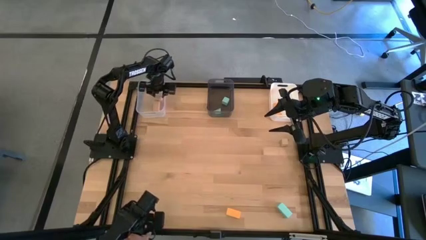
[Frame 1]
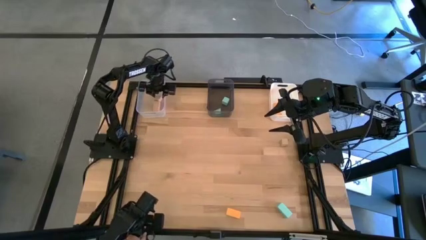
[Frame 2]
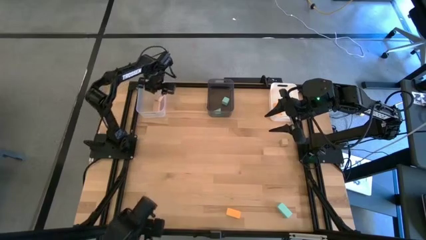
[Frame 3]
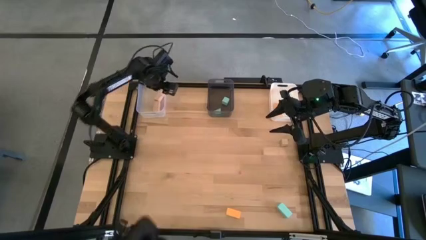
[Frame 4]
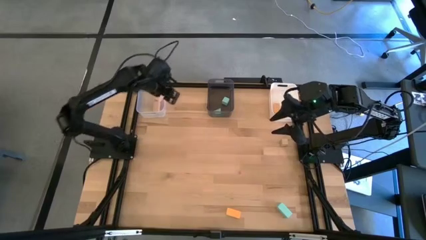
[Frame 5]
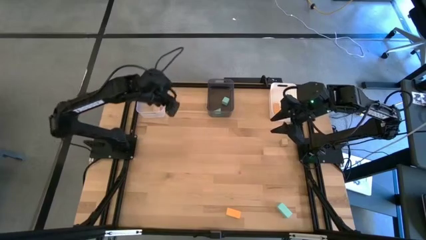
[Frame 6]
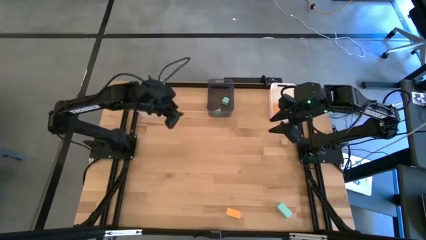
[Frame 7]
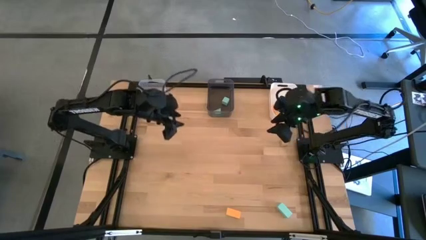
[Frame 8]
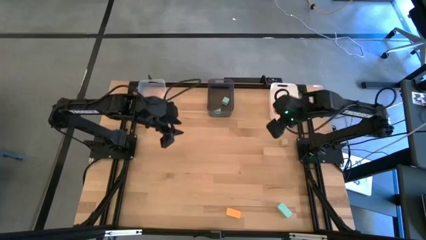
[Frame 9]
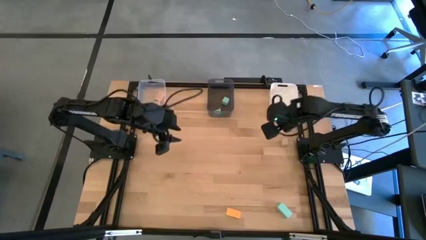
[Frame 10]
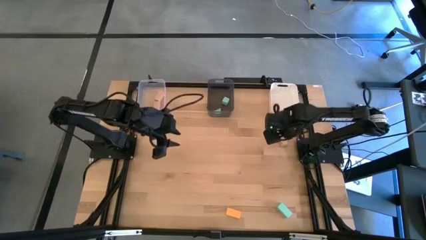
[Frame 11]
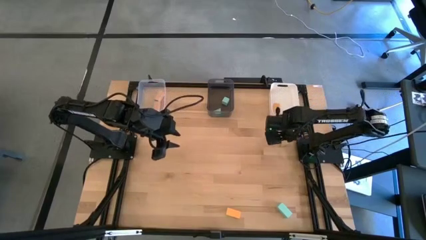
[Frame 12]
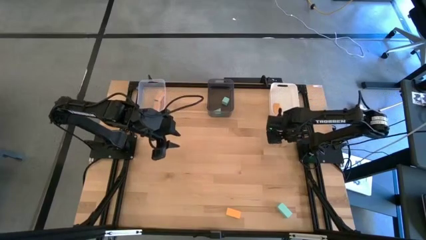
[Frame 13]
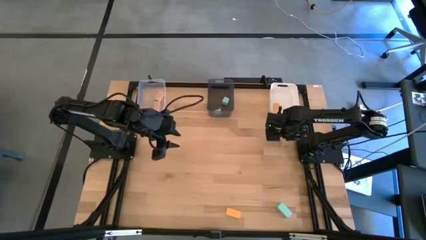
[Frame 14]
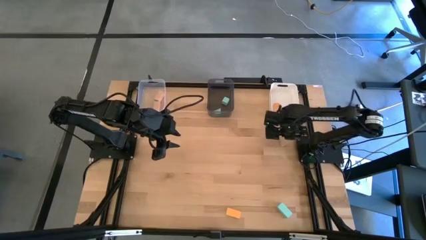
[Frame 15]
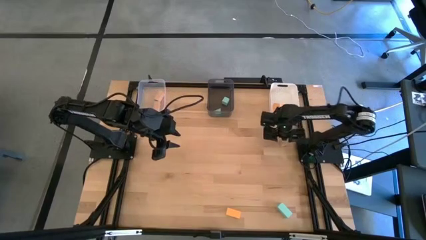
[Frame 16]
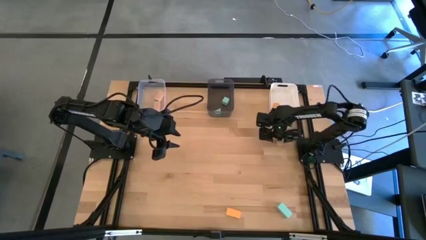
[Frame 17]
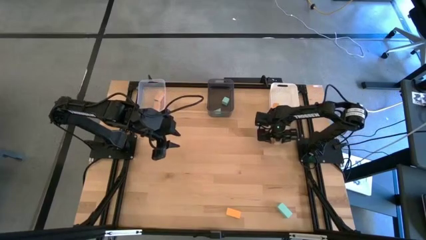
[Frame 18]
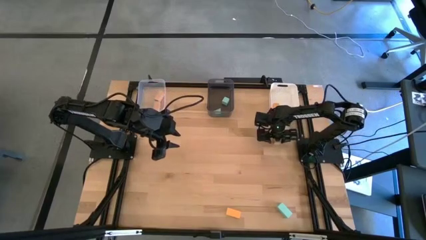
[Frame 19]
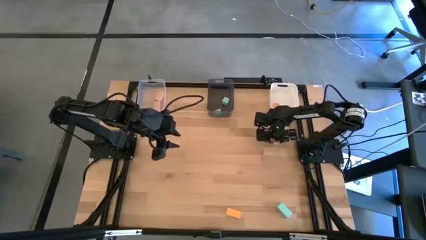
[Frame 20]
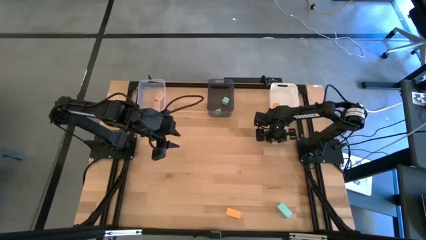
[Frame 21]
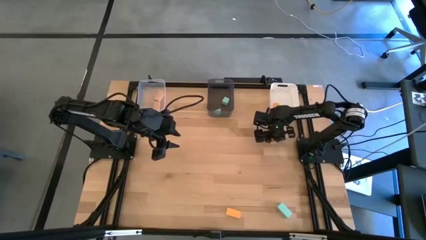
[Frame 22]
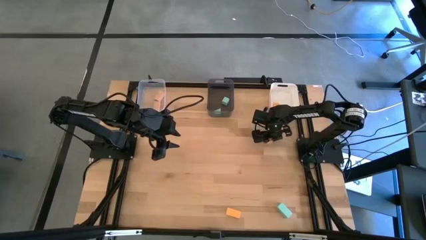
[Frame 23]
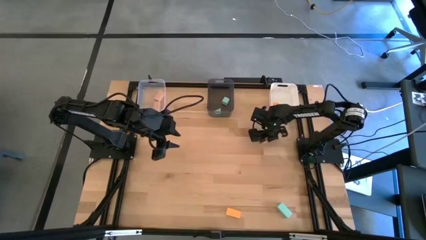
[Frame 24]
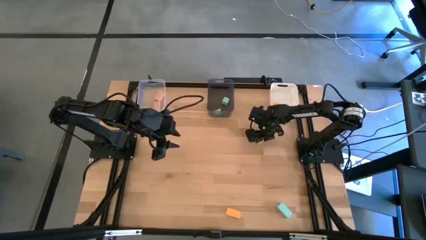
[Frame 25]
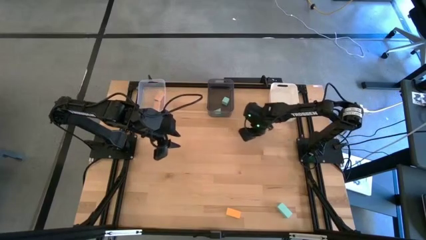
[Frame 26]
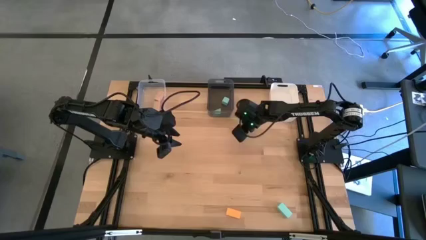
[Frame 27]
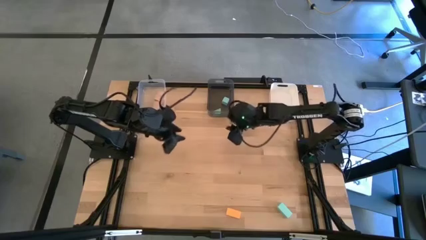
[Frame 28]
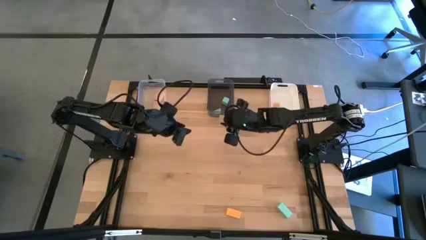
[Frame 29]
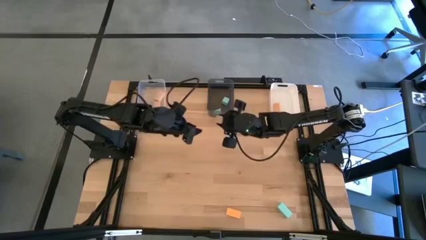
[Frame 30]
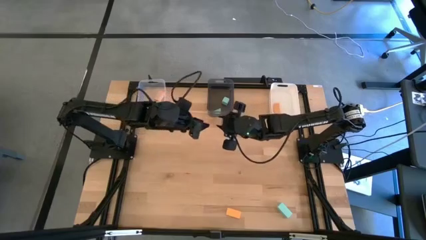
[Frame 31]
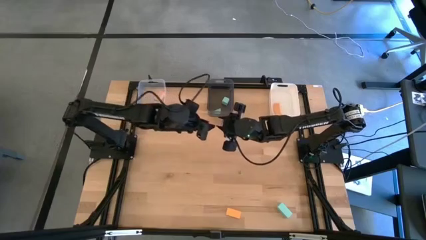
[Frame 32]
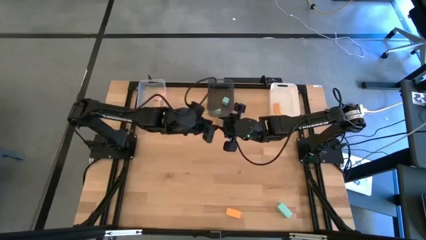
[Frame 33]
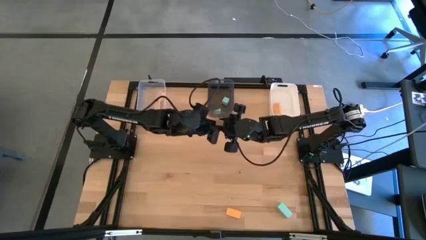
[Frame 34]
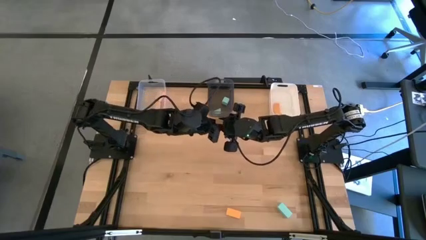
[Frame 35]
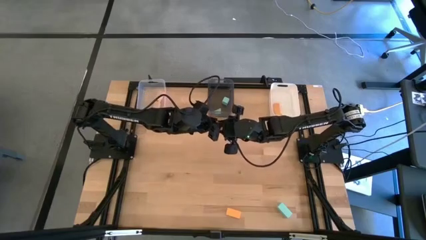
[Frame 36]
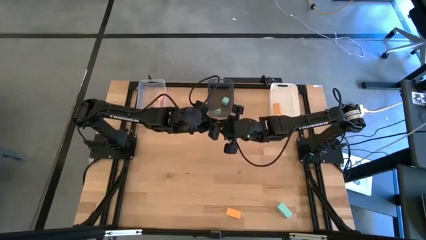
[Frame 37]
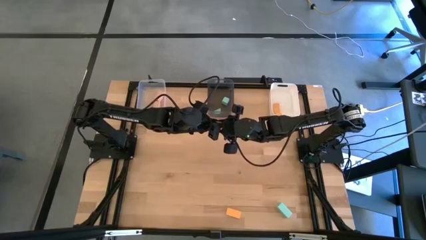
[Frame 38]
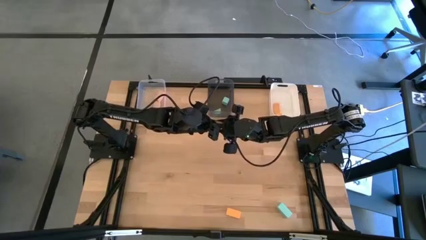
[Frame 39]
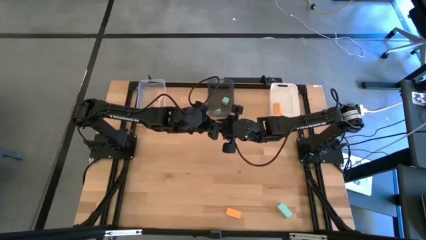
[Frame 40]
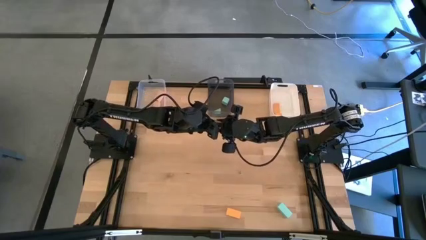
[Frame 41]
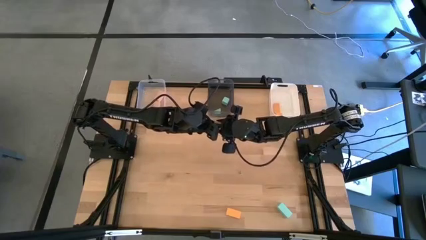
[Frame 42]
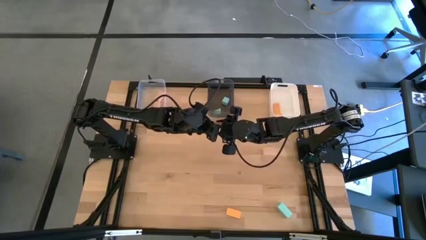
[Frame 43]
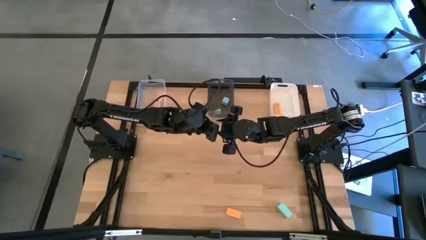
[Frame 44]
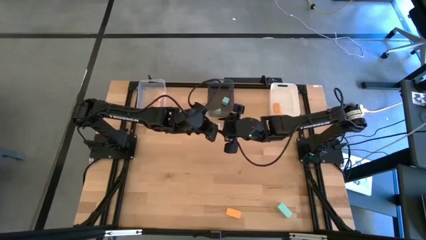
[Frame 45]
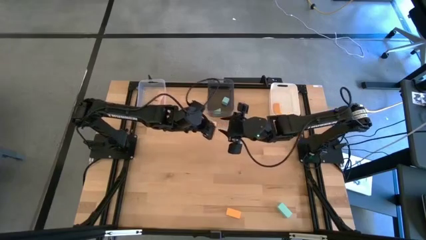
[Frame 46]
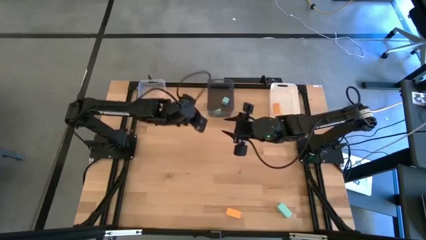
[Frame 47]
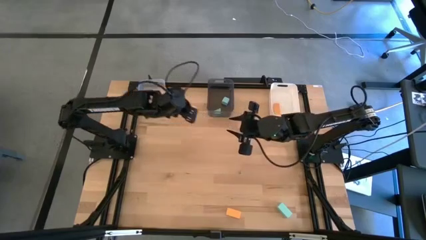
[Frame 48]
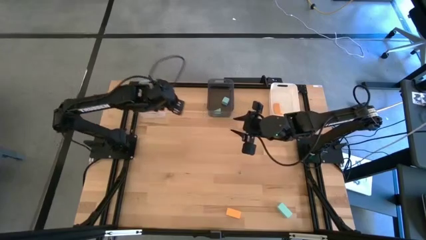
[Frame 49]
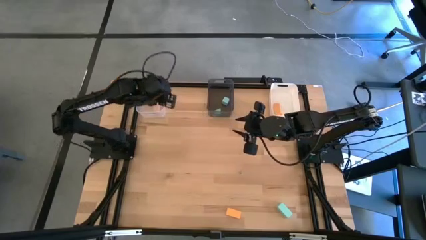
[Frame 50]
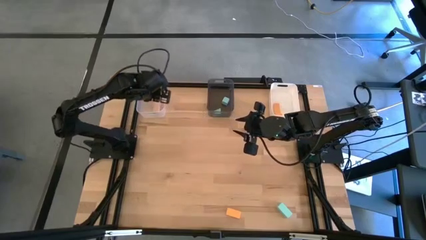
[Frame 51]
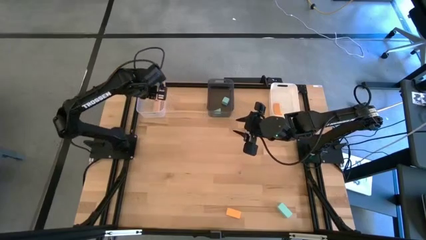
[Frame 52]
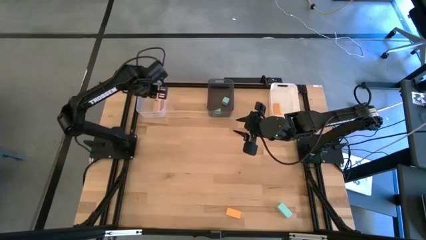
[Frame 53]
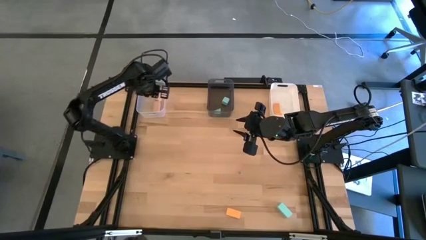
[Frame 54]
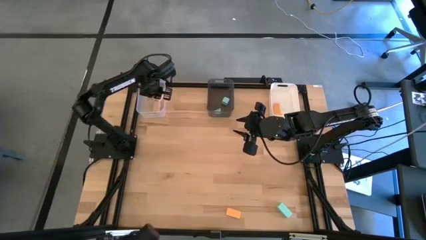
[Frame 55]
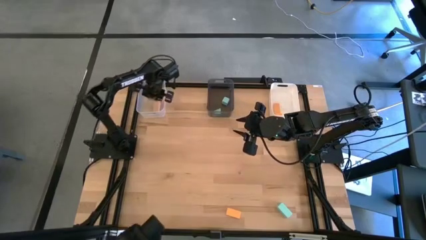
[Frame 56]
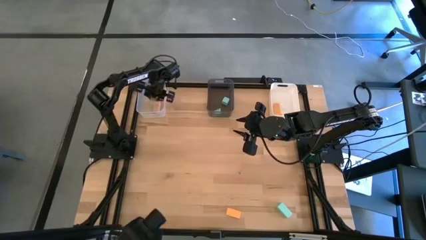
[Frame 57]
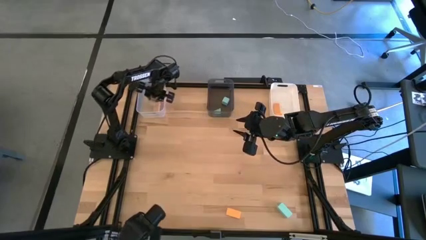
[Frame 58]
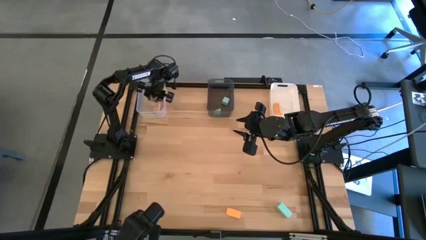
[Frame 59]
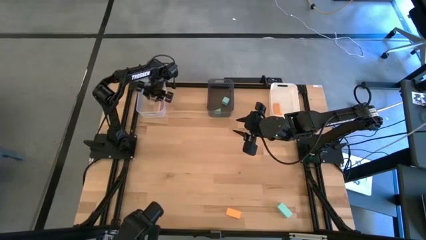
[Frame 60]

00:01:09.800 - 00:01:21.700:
Task: Sort & place blocks by color
Put the light brown block into the transparent bin
